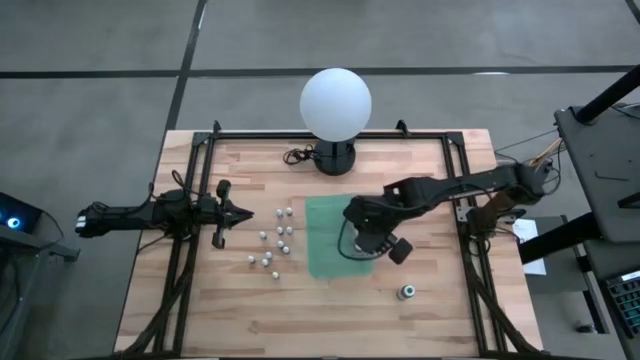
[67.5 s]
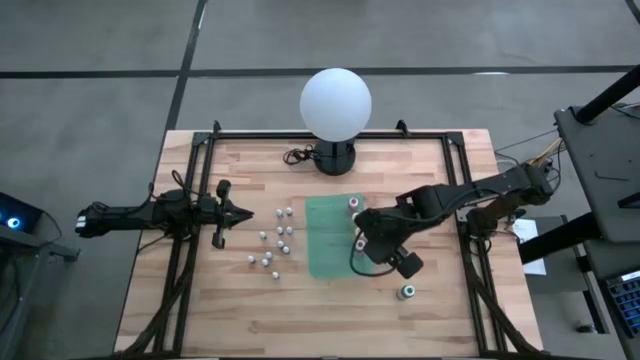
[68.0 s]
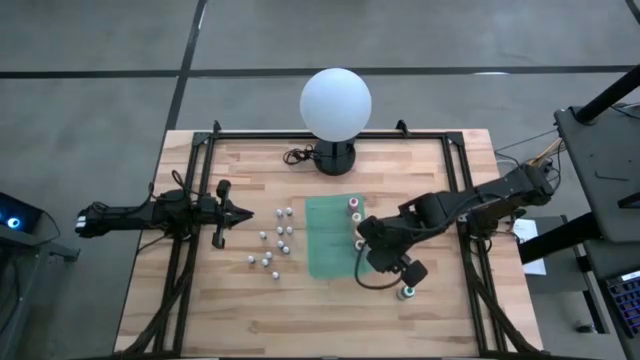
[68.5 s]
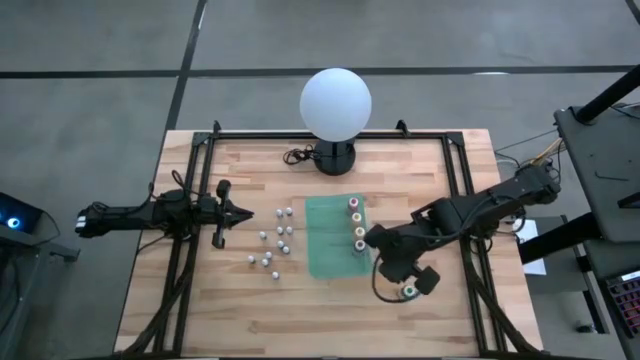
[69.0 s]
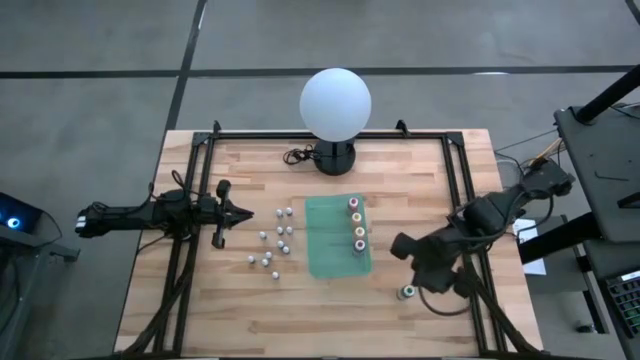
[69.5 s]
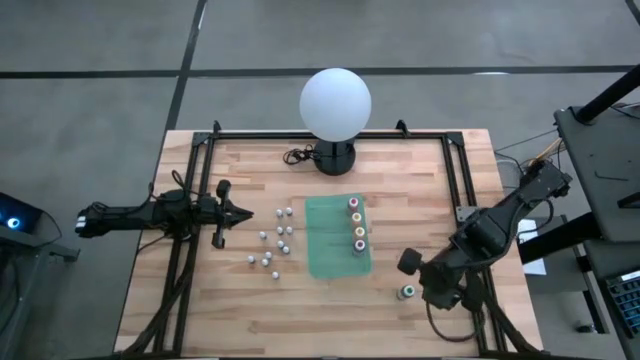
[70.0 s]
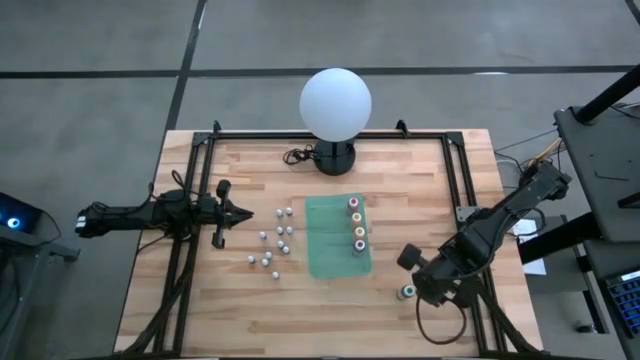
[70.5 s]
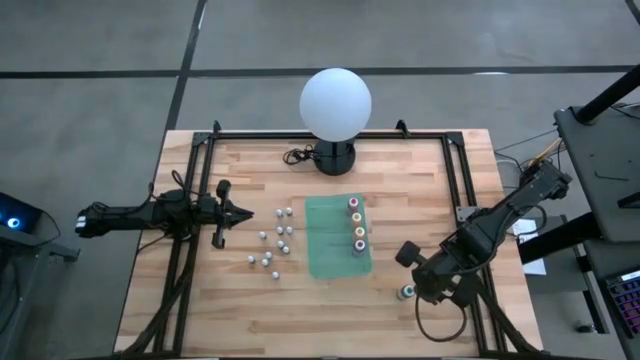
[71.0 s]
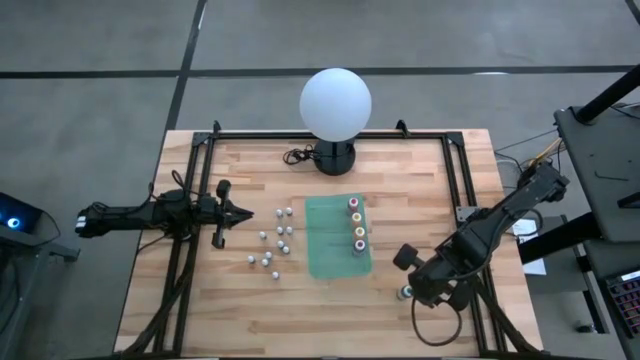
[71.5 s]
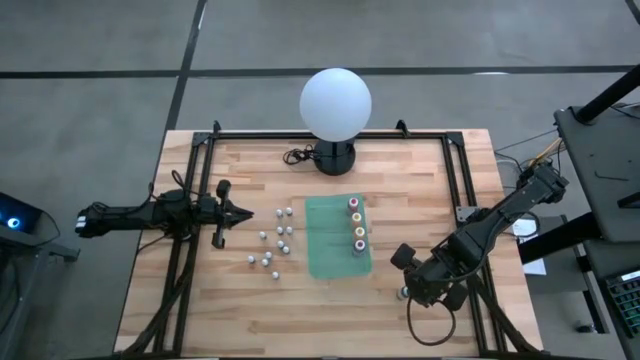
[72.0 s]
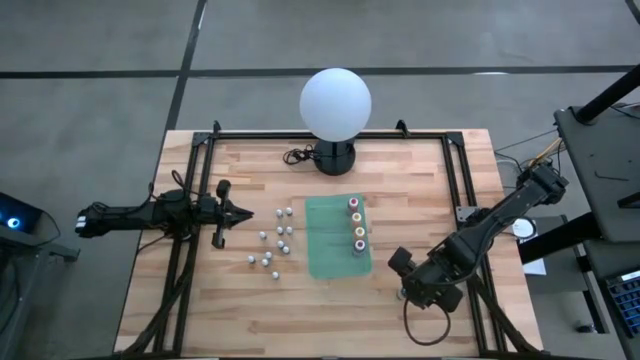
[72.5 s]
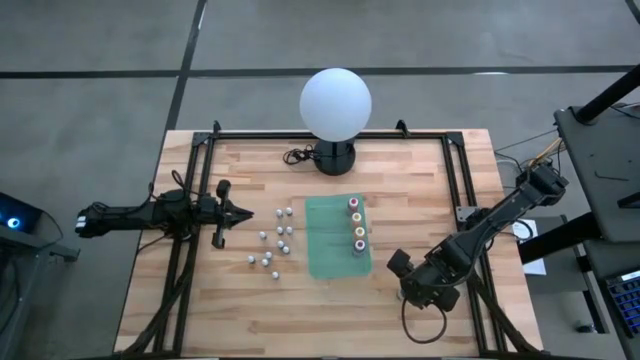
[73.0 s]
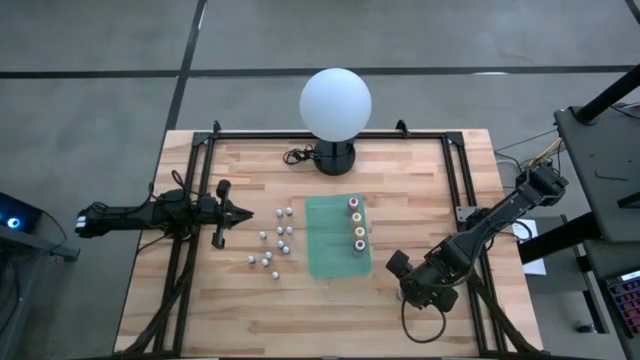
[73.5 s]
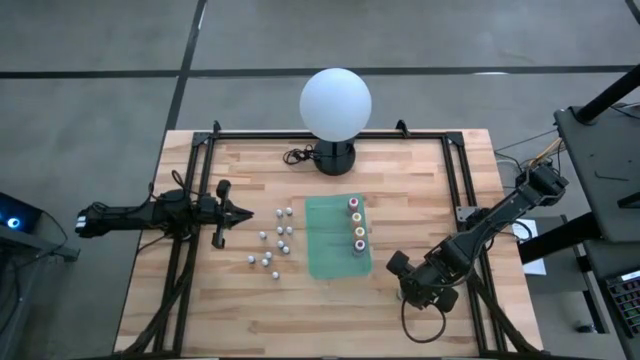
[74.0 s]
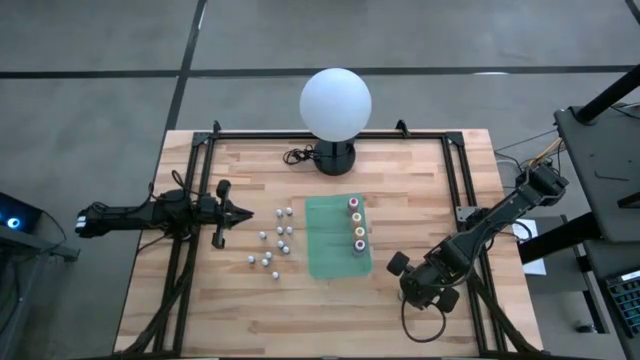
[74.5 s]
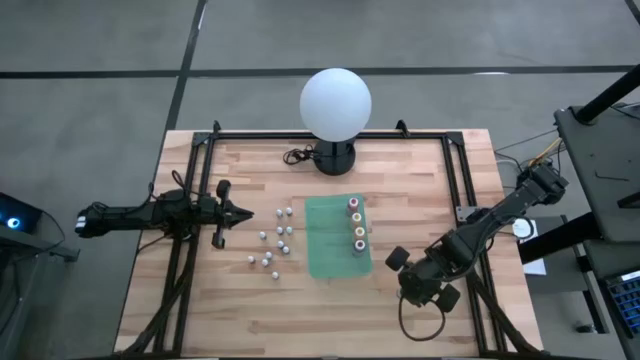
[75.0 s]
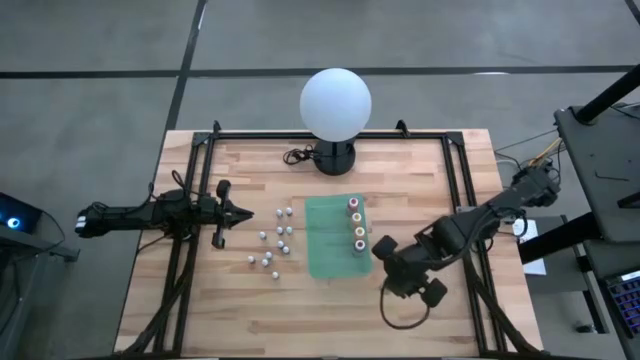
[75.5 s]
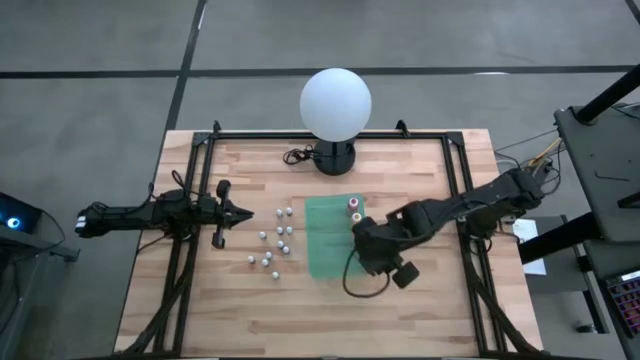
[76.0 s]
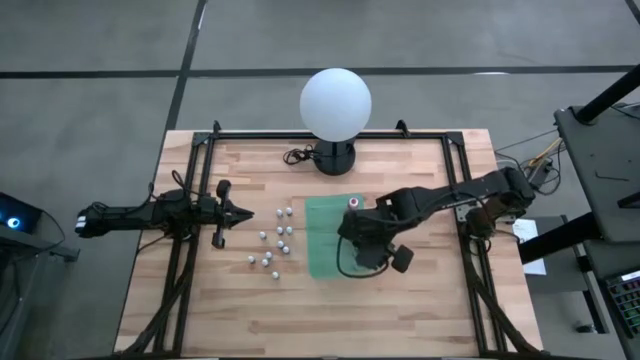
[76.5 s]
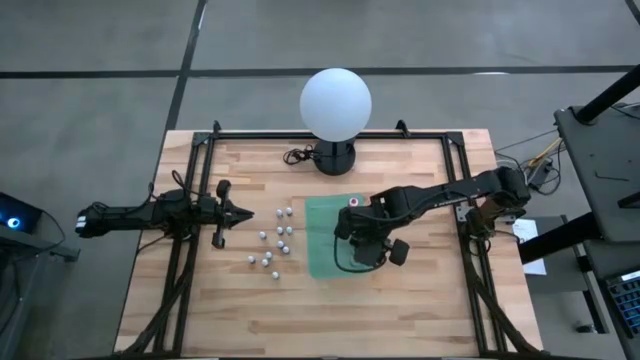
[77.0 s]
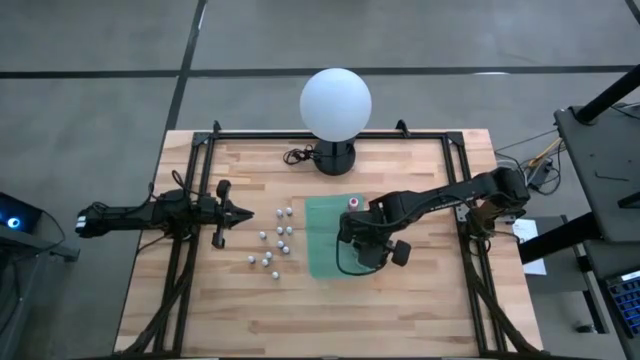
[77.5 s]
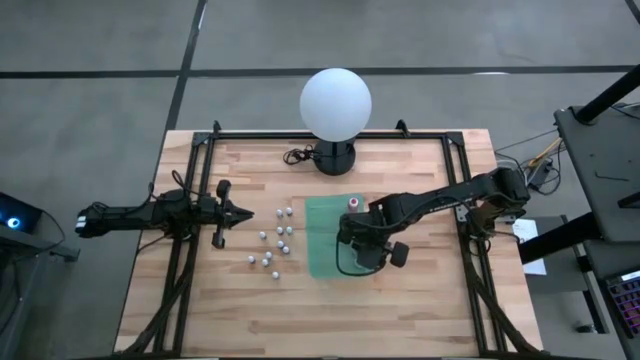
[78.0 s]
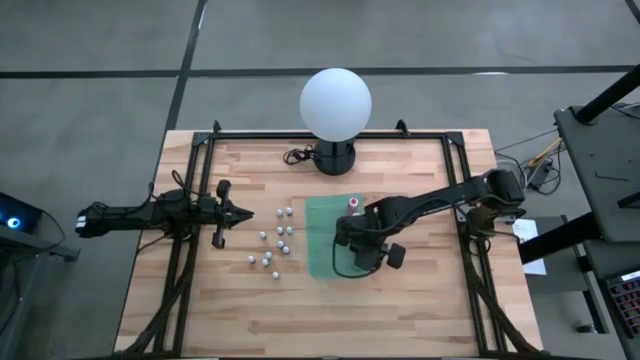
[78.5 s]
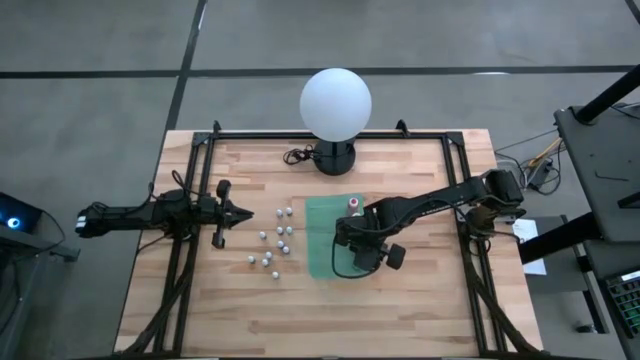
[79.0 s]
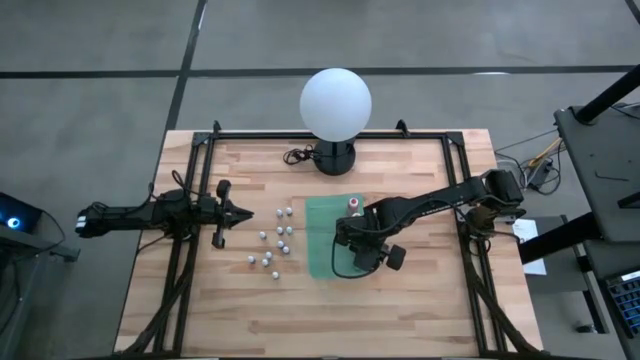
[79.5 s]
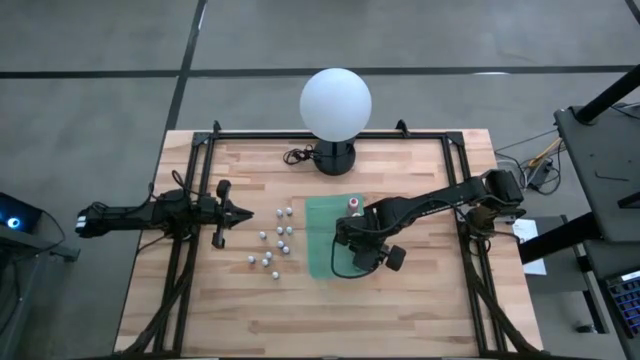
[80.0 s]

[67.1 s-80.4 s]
Task: Pick & Place food coloring
Put the large green food coloring bottle into the green bin

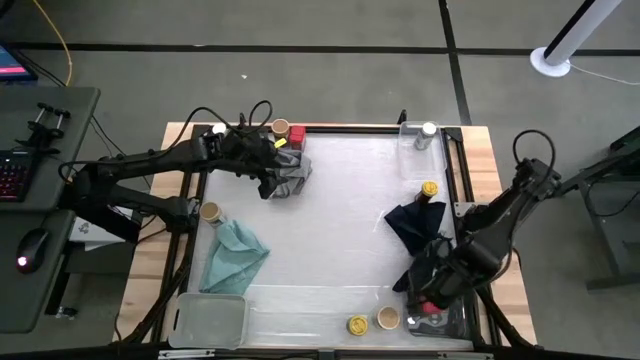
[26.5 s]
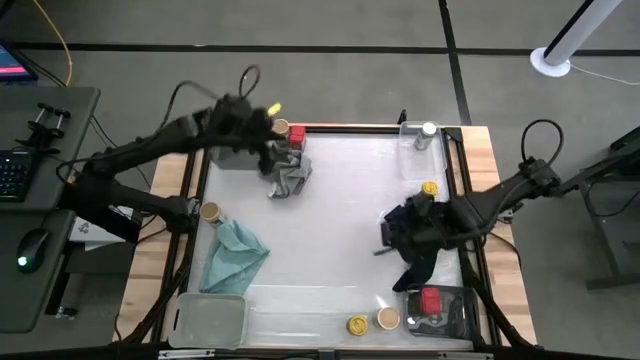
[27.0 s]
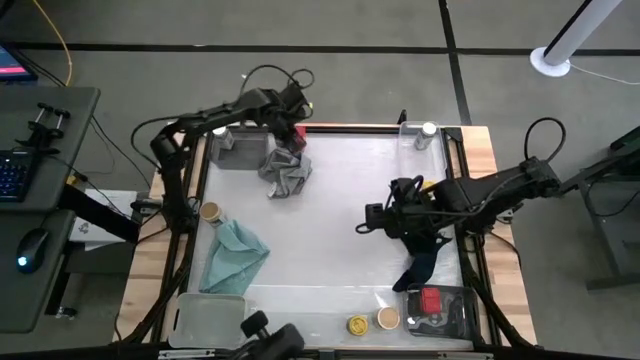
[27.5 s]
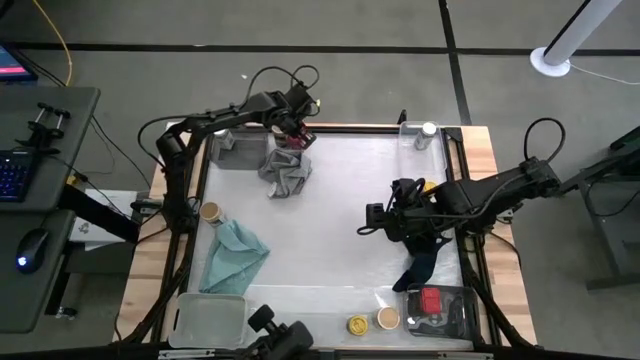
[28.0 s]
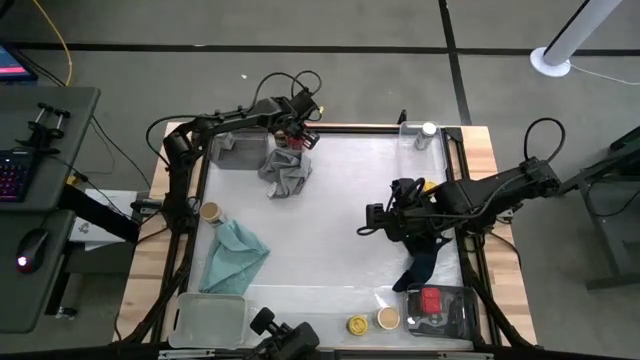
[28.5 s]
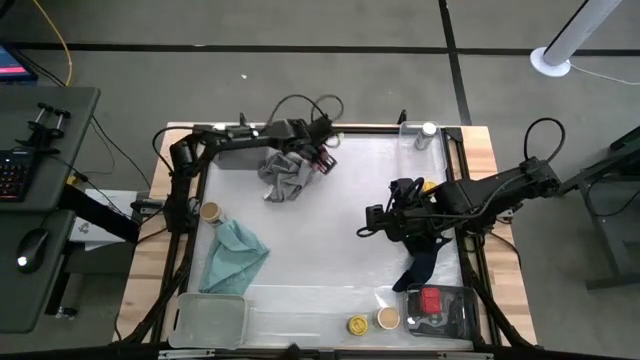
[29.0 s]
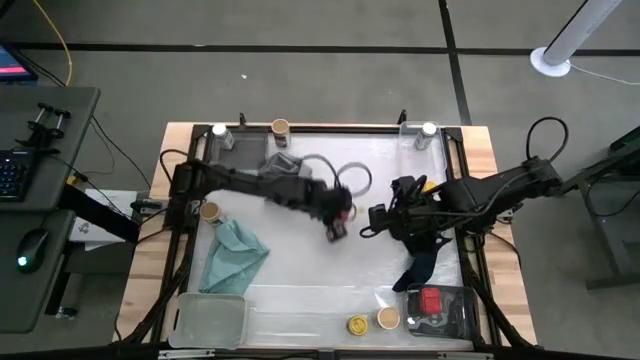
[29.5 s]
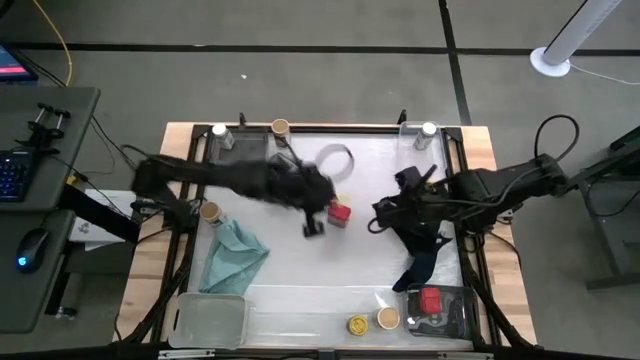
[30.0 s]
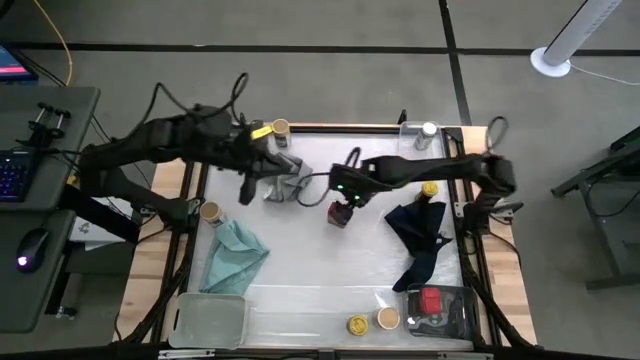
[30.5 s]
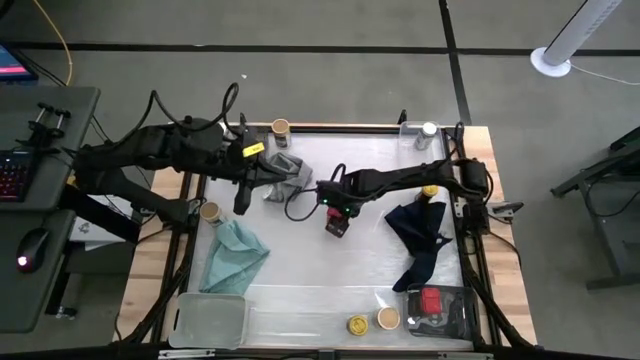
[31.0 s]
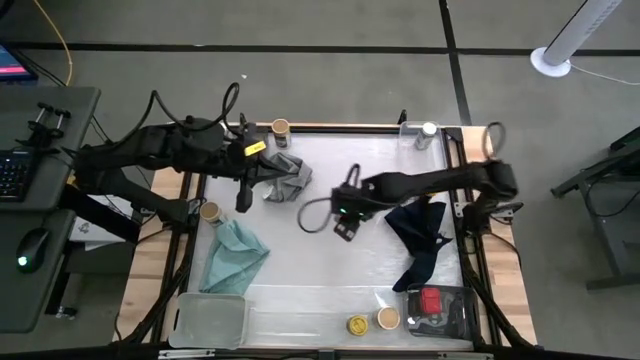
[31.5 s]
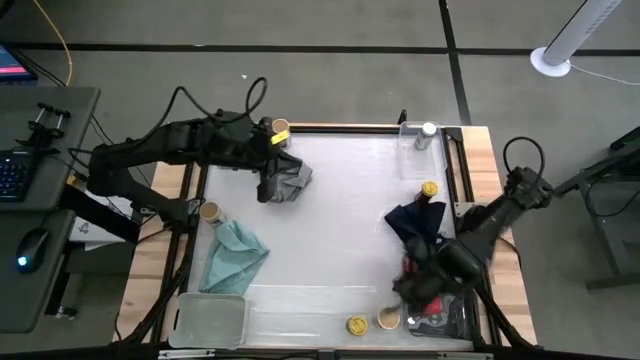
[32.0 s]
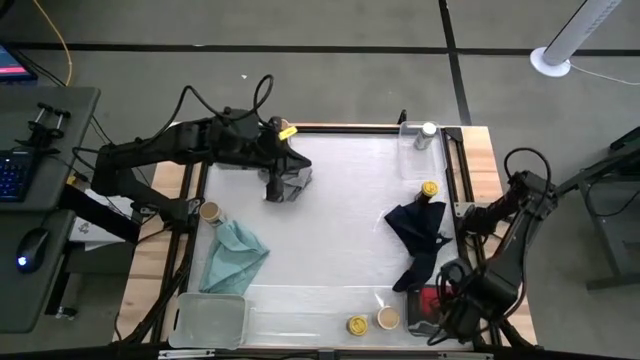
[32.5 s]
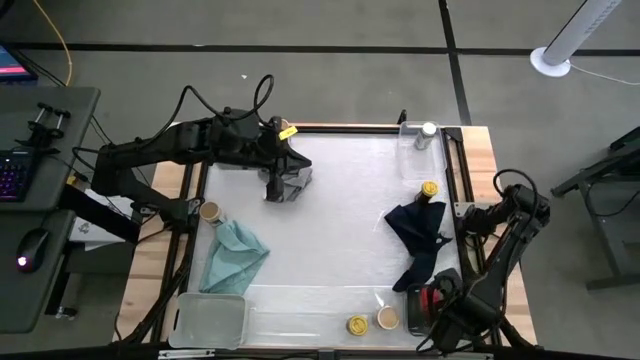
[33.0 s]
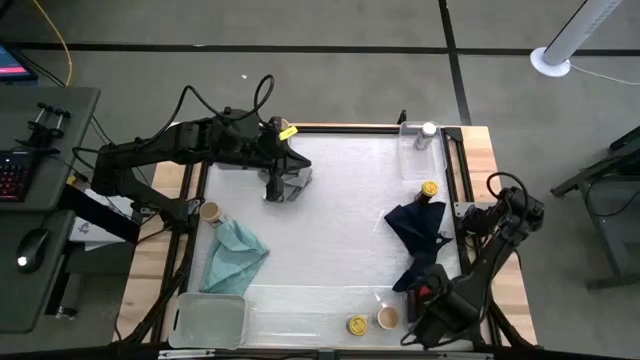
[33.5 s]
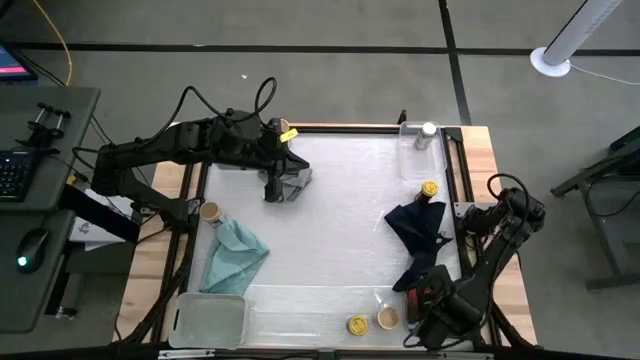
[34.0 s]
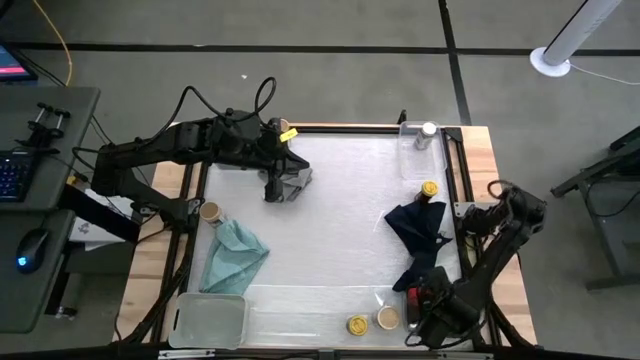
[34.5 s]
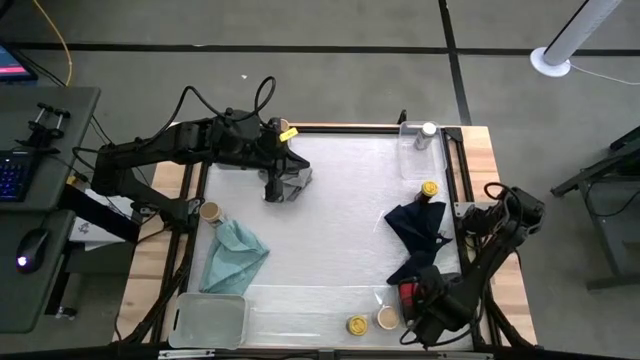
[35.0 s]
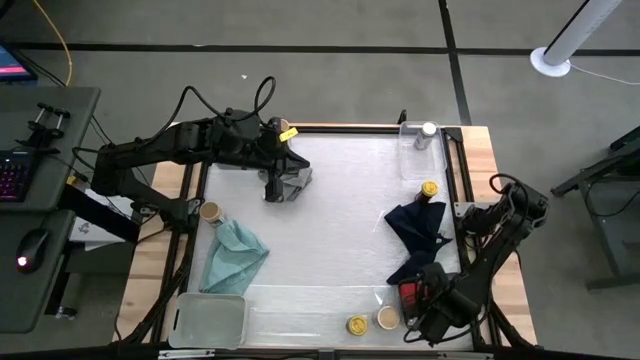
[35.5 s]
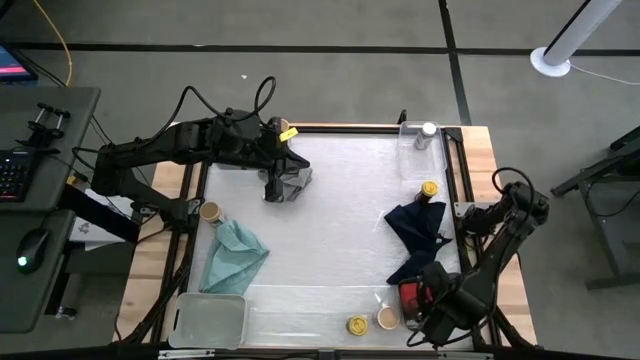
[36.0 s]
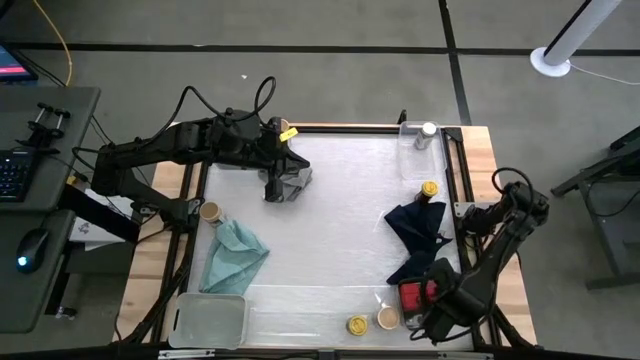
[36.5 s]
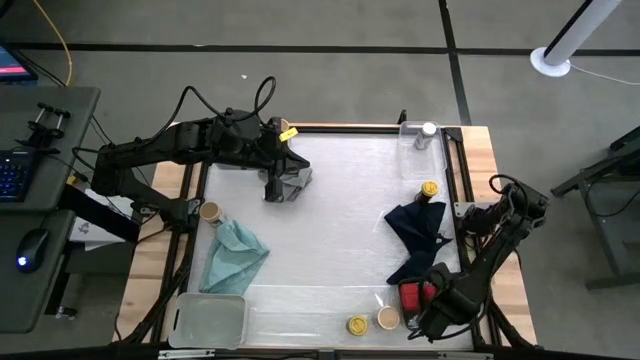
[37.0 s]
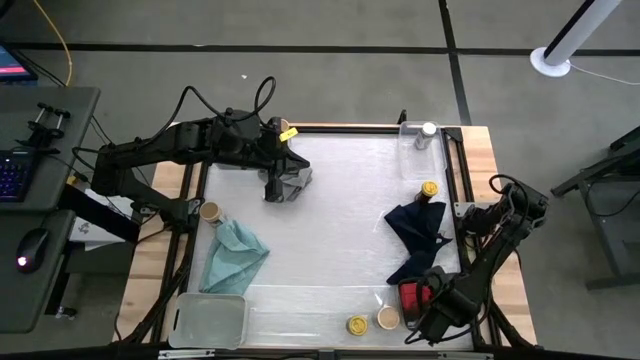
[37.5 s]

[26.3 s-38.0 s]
Task: Sort spices by type
Put the red seasoning can into the bottom black bin
